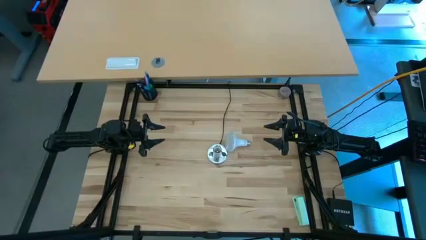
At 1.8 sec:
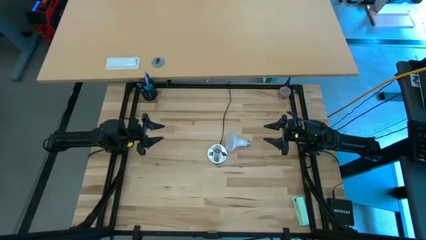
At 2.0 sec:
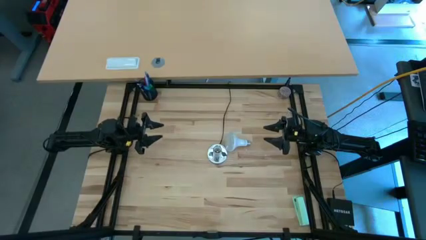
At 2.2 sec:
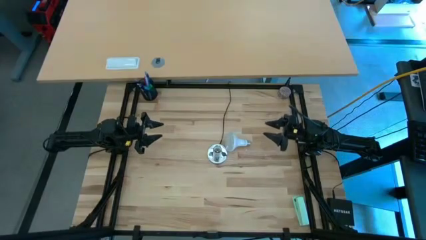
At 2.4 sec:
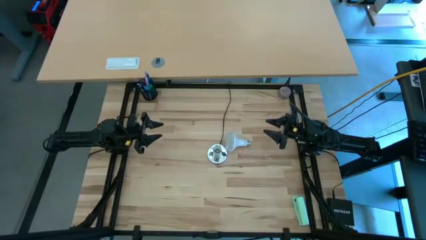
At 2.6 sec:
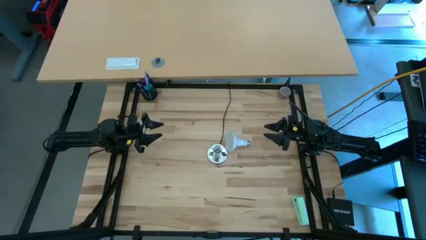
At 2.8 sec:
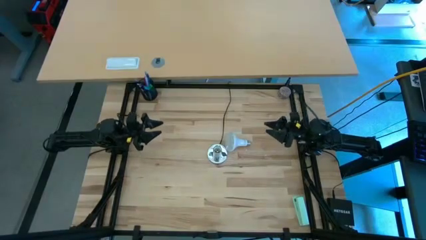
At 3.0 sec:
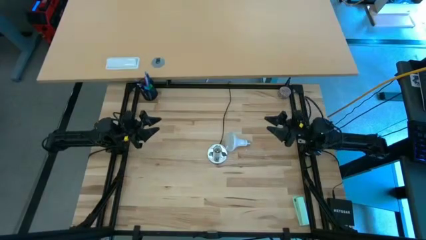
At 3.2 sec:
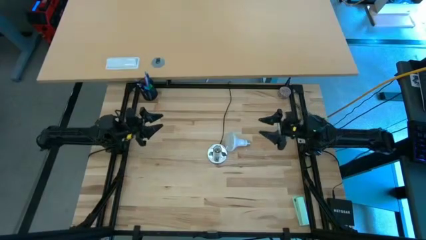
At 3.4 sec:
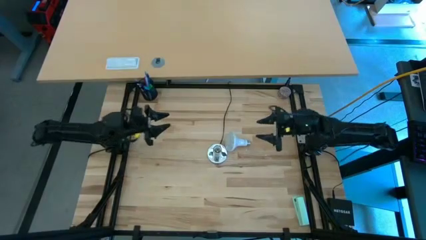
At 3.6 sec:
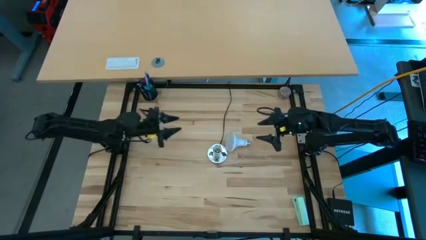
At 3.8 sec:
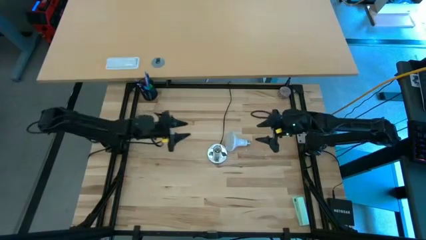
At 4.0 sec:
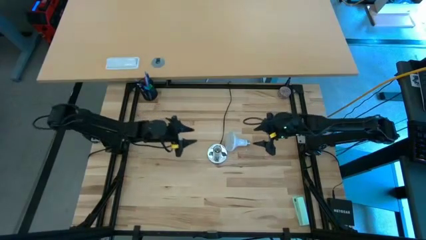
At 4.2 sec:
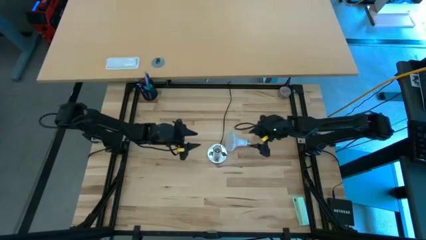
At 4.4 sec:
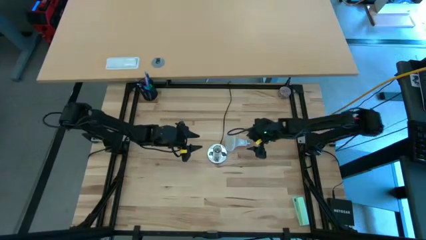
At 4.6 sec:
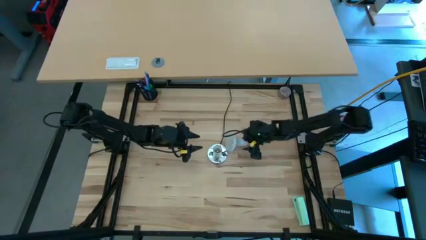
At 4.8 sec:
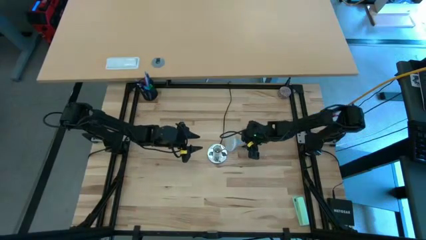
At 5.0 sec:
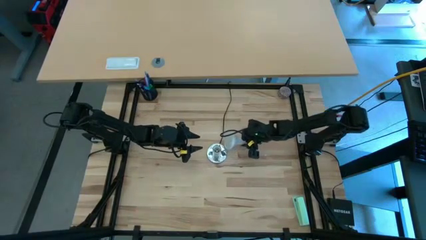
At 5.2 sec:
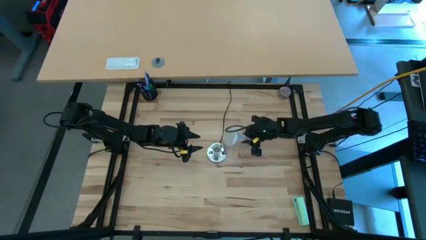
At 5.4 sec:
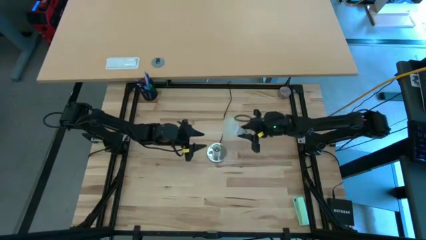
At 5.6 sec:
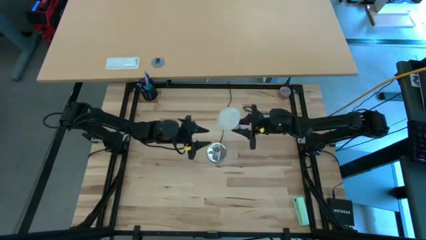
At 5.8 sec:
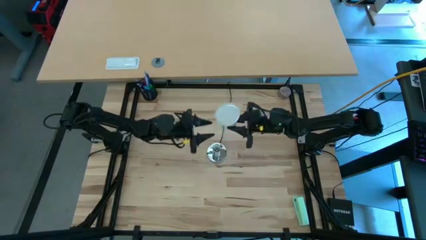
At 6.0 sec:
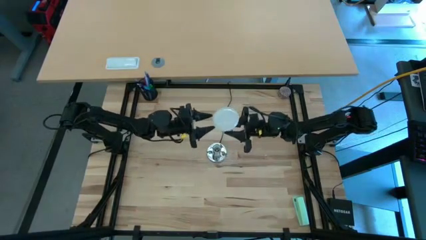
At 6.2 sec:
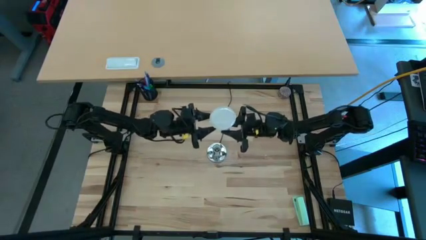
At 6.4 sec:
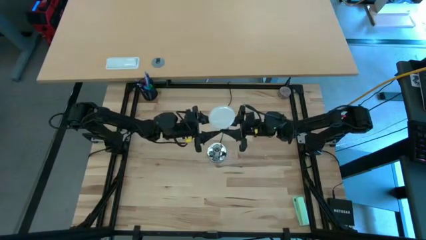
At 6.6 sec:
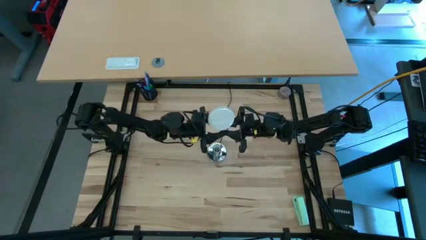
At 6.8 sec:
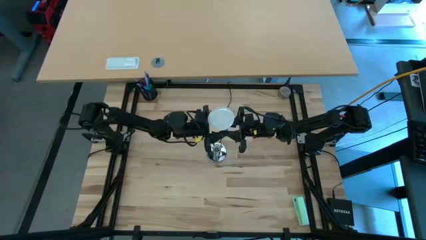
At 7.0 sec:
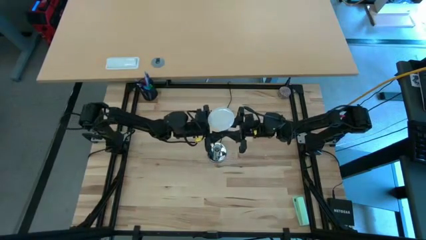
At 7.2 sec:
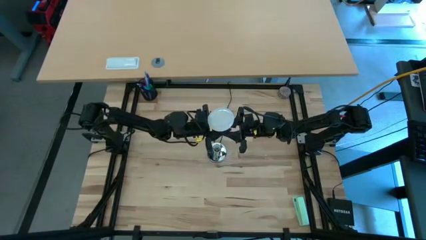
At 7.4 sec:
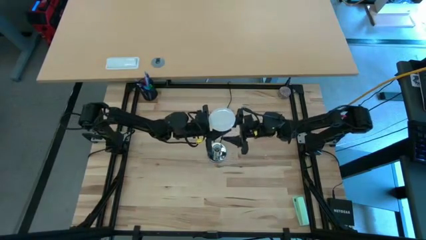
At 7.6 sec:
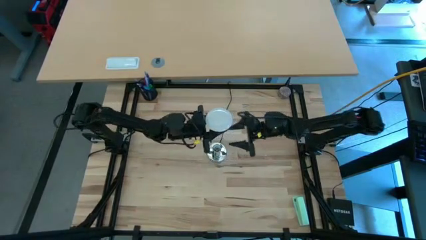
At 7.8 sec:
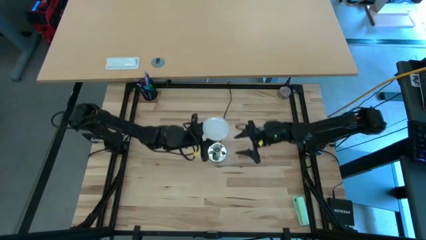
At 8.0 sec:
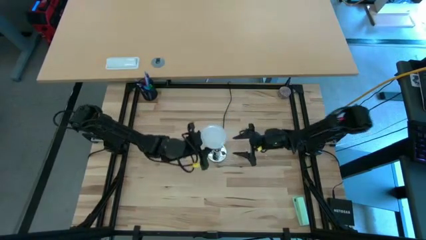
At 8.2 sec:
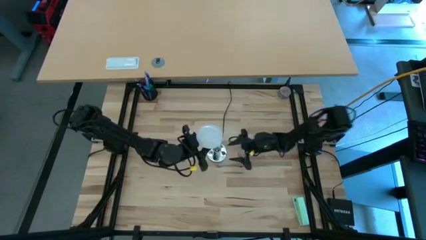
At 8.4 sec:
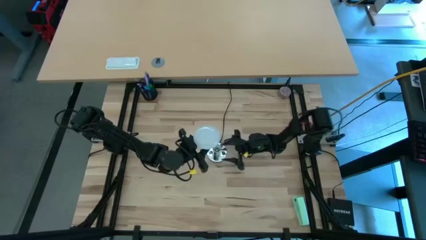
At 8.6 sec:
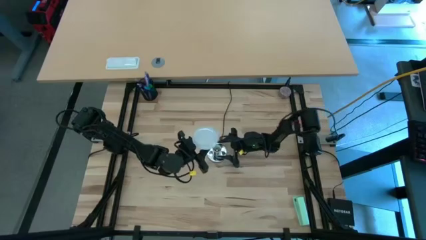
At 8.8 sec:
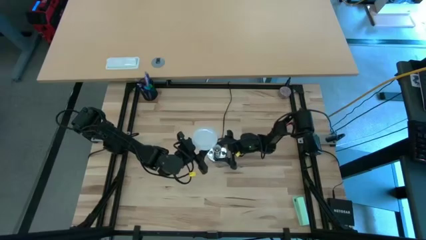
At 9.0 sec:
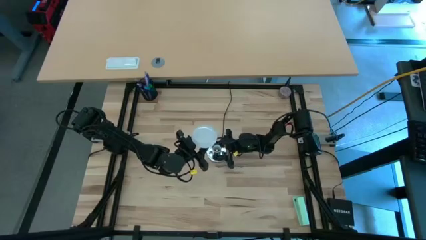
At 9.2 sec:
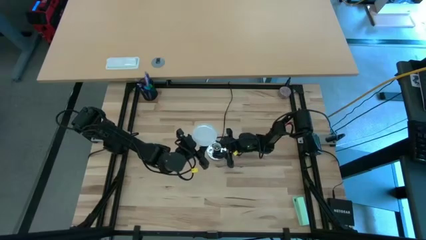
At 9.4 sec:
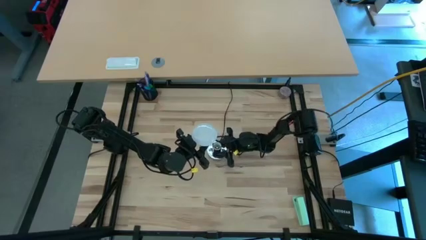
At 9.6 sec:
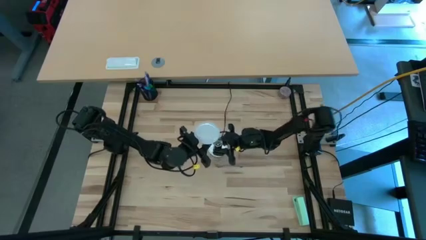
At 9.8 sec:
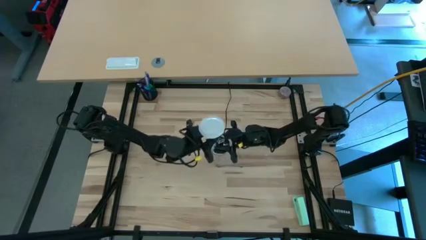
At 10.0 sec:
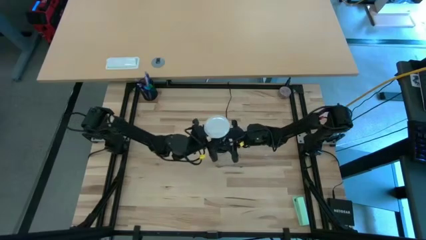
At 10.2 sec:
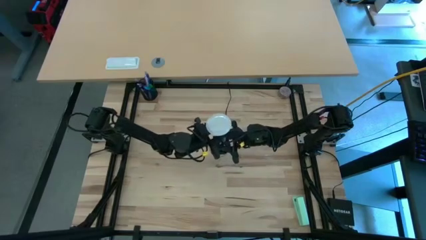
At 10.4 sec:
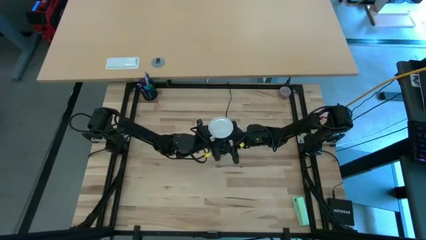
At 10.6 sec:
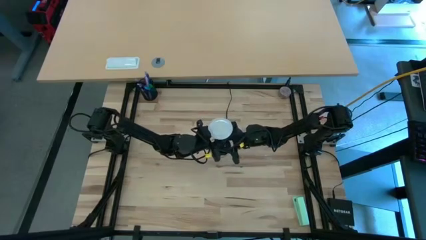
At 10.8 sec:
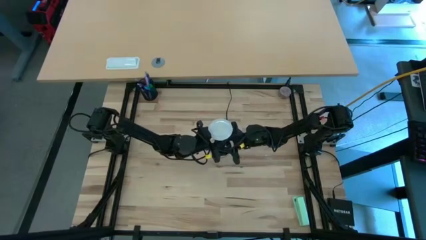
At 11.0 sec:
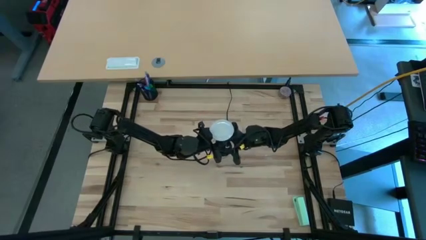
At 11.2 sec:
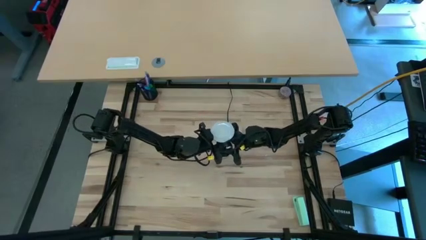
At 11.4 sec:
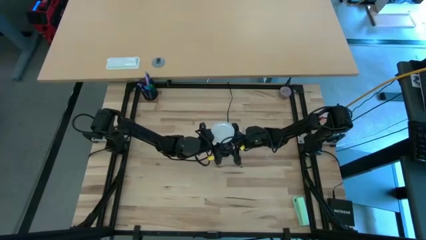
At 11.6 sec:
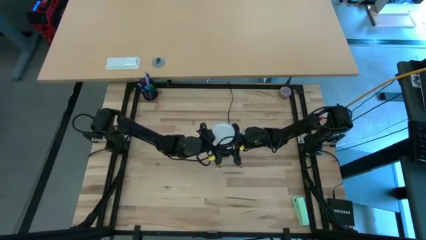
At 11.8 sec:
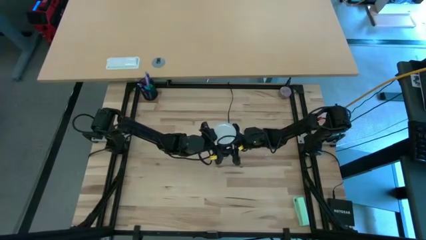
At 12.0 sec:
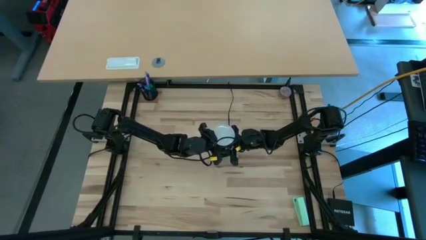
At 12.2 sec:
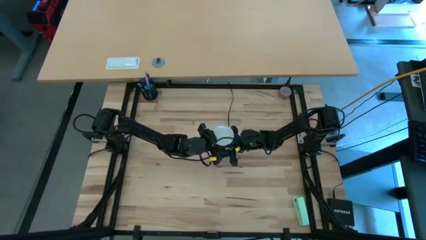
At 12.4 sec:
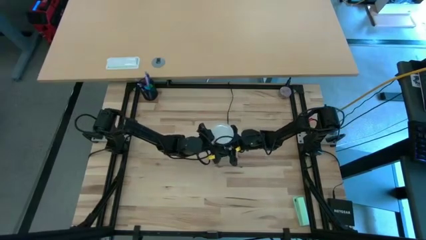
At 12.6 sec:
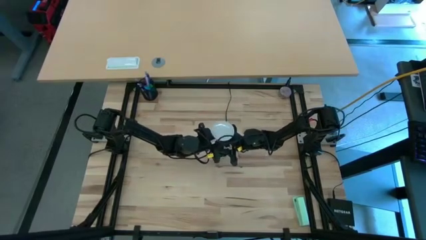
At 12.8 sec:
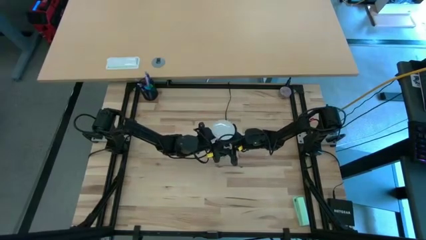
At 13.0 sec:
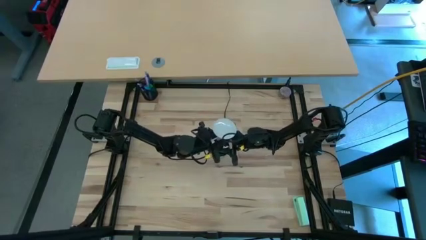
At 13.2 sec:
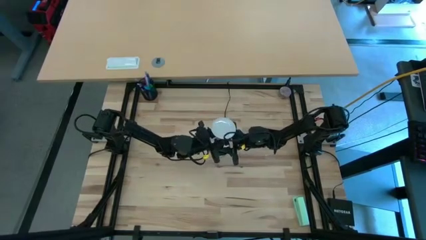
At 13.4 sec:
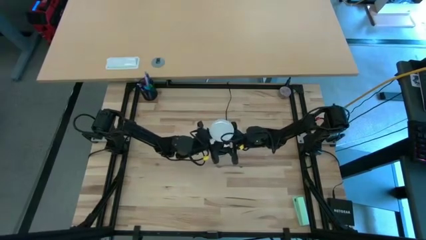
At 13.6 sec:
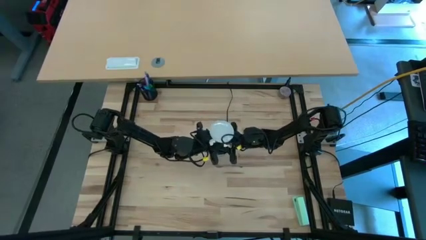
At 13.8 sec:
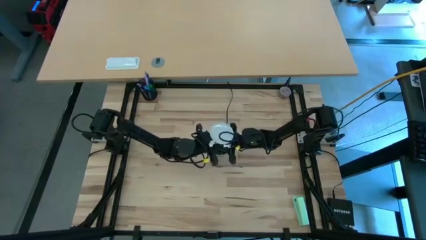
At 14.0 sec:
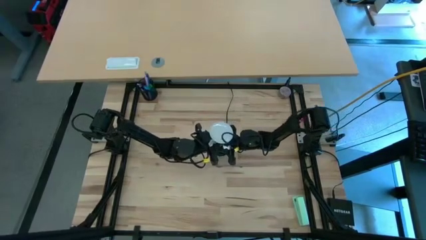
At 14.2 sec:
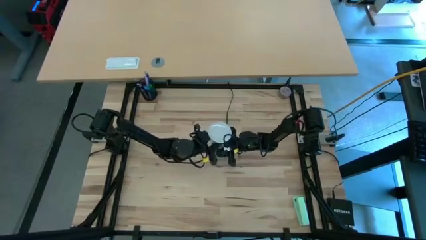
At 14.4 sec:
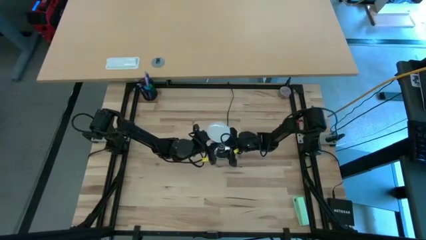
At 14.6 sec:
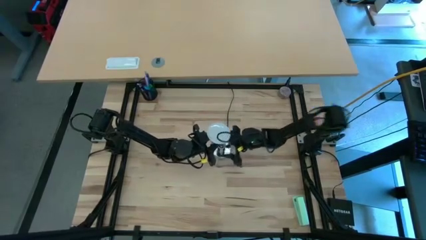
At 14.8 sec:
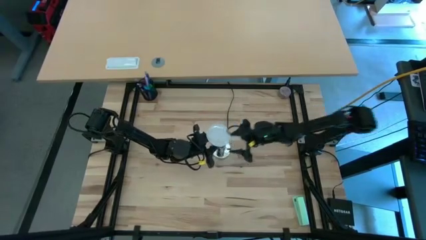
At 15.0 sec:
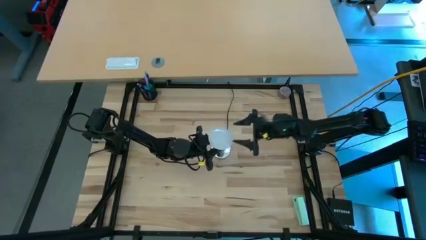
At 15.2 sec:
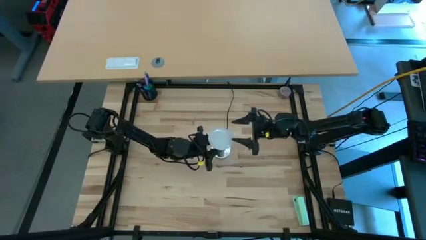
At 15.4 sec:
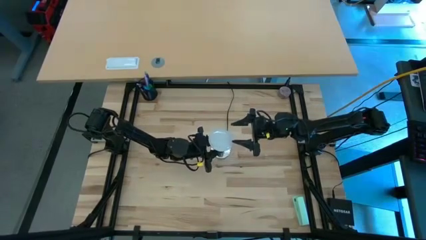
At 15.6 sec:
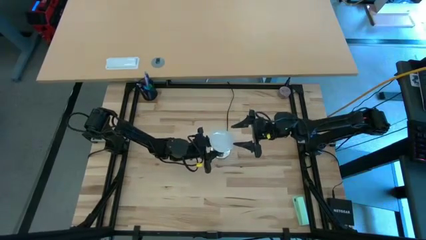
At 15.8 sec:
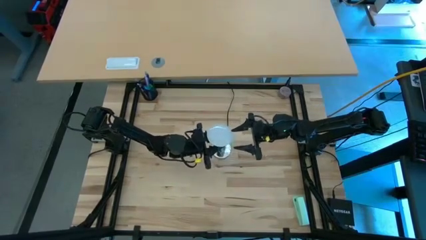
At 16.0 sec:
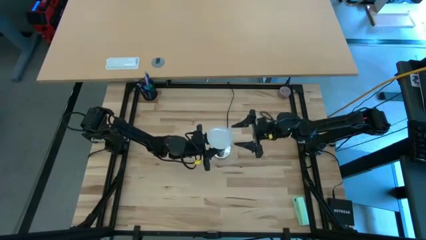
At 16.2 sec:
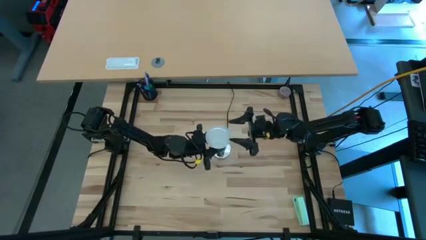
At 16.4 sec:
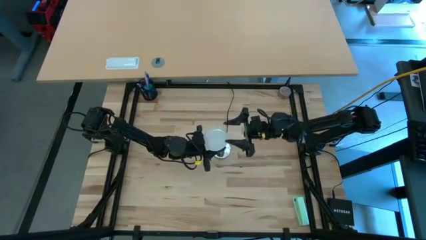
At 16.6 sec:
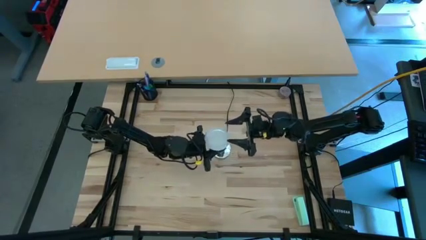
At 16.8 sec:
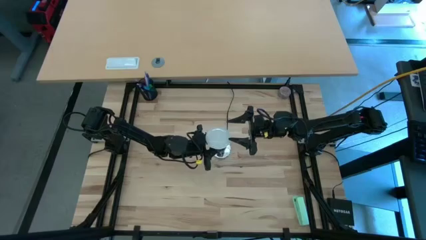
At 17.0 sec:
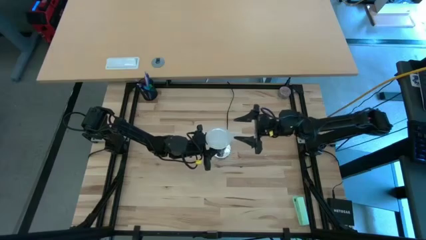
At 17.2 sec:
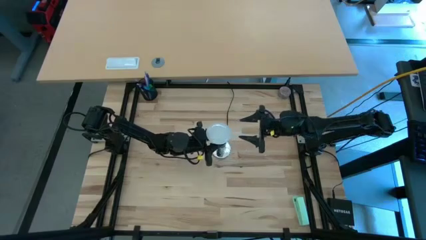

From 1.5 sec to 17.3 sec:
Task: Screw lightbulb
Insert the lightbulb into the lamp
